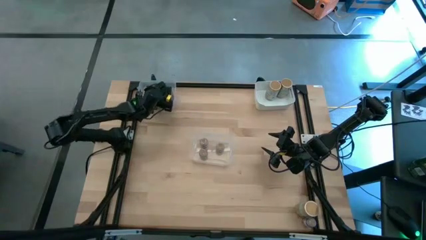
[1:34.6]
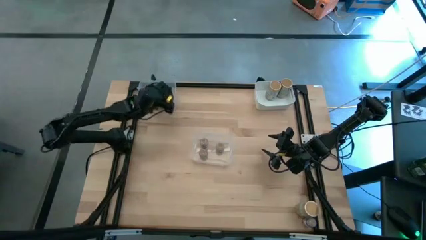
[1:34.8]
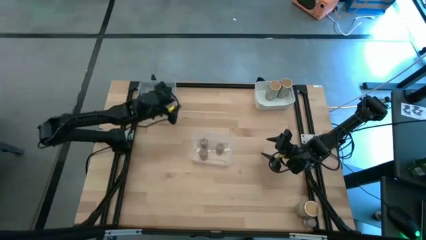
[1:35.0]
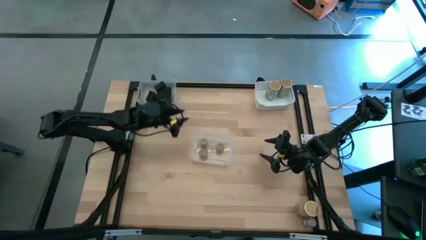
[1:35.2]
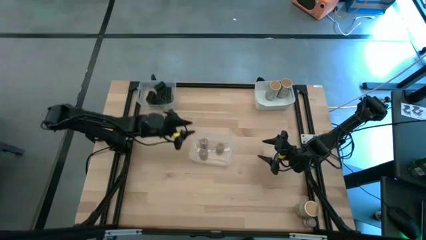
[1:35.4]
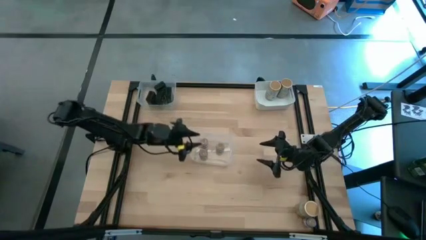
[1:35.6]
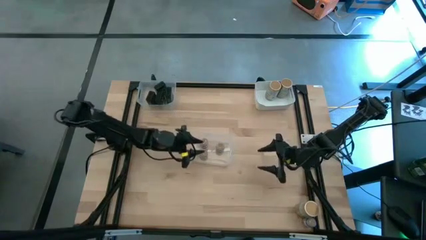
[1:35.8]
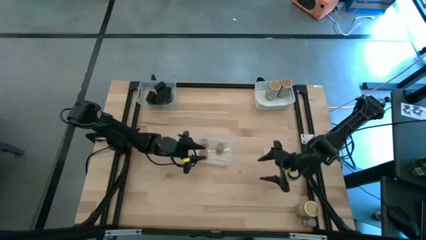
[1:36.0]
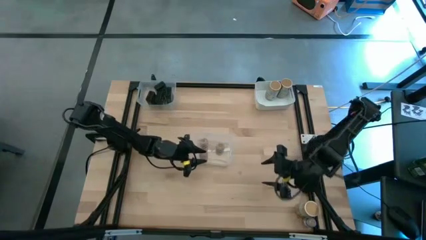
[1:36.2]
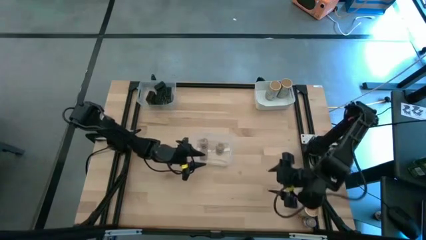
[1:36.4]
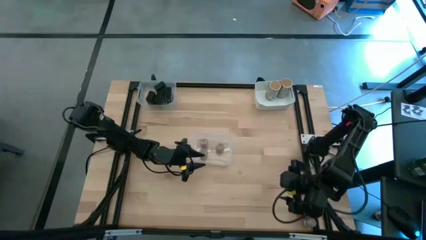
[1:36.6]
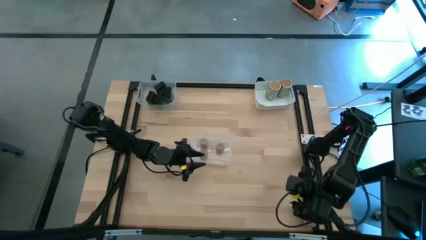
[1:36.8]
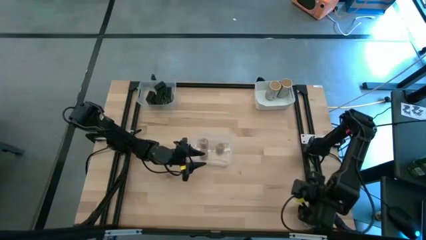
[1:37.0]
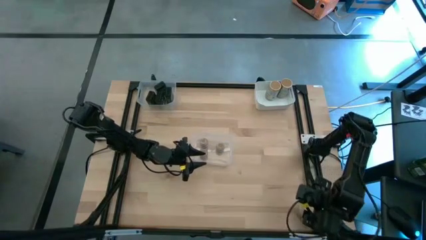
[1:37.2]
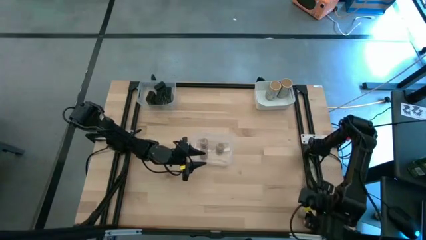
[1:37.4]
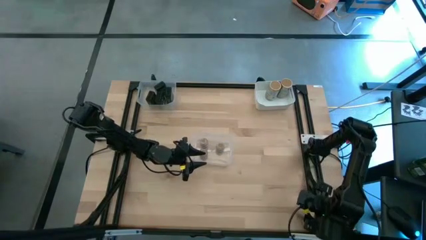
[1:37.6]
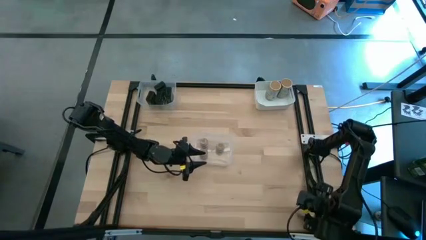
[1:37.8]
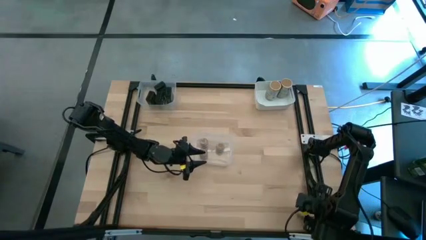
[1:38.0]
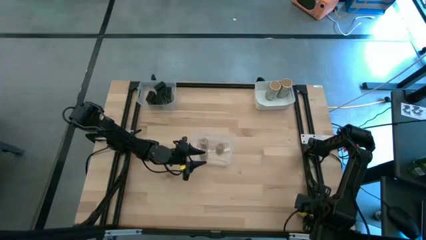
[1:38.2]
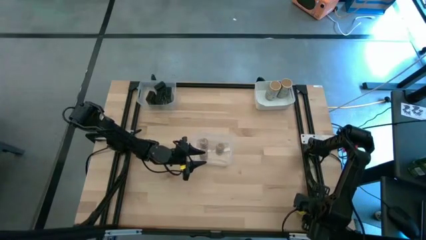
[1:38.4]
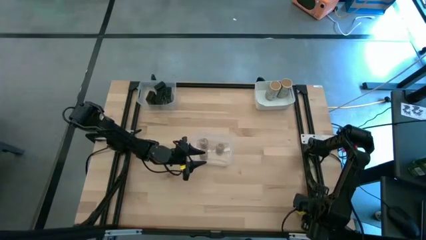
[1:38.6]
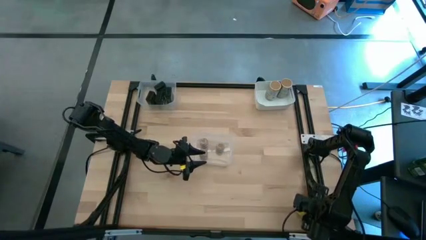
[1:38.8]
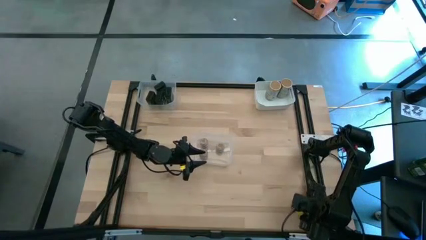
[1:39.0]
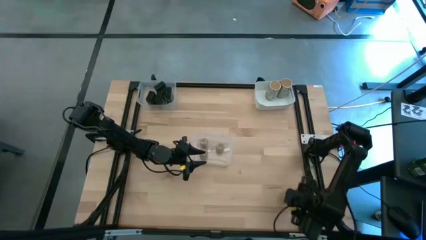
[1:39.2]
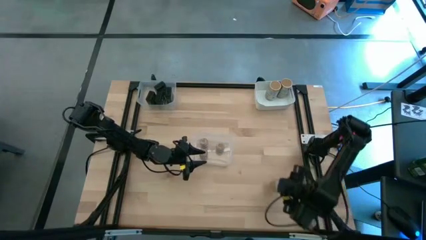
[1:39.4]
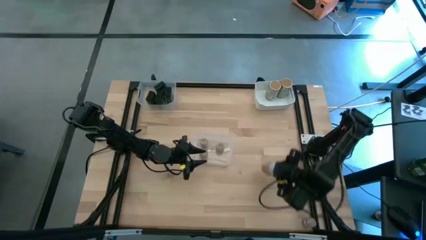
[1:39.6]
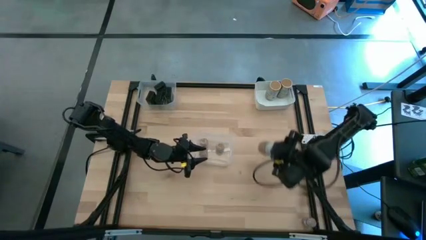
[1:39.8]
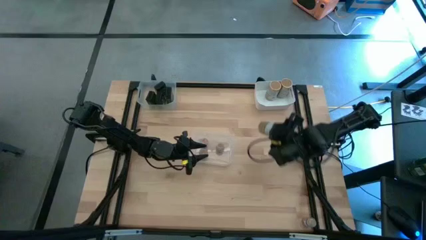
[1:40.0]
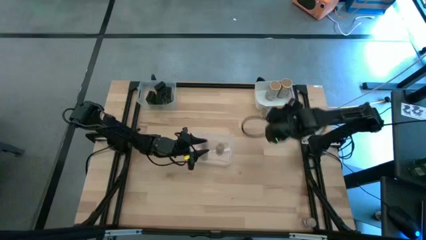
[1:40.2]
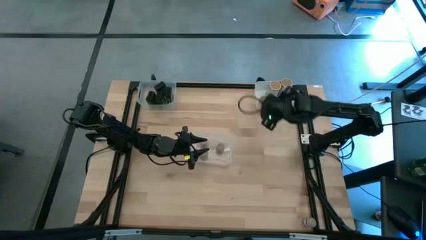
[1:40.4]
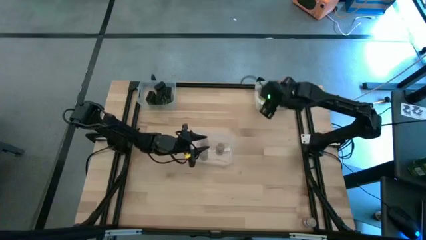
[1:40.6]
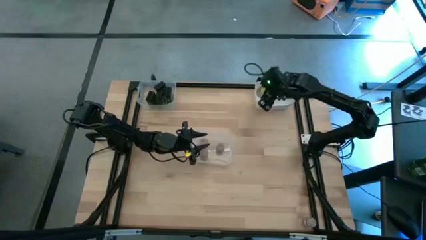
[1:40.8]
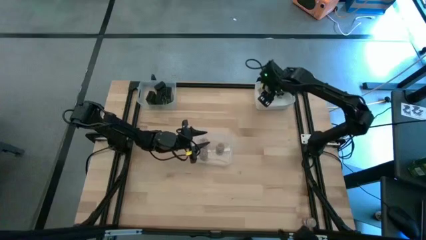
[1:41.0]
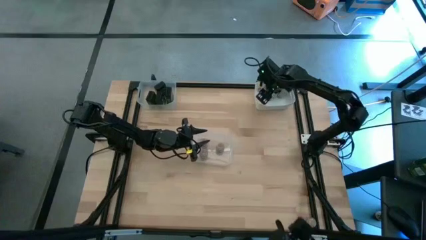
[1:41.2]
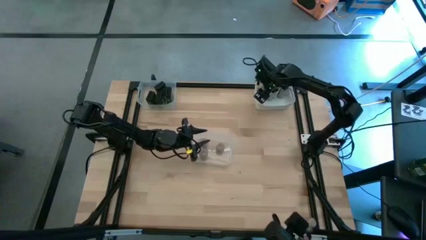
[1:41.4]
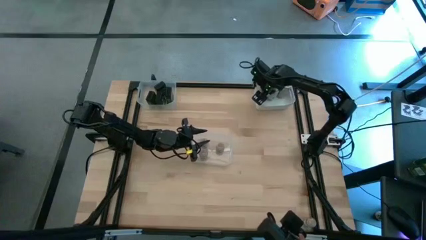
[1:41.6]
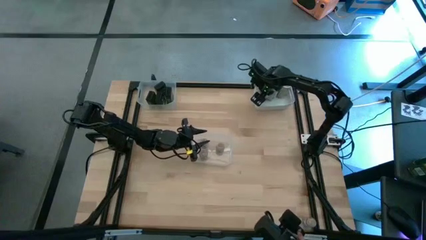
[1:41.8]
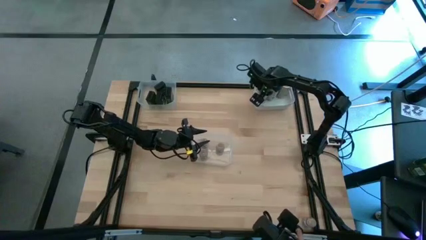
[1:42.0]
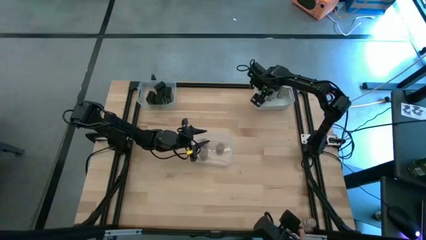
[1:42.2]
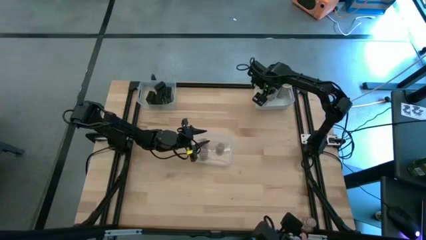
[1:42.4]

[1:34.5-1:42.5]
Task: Sort spices by type
Put the gold seasoning bottle into the white bin

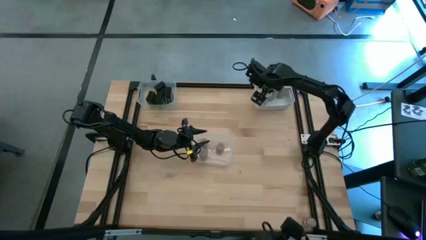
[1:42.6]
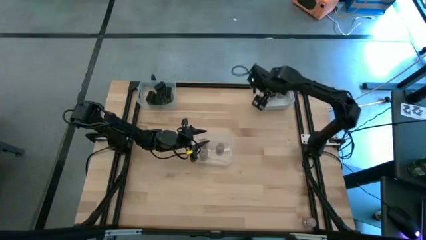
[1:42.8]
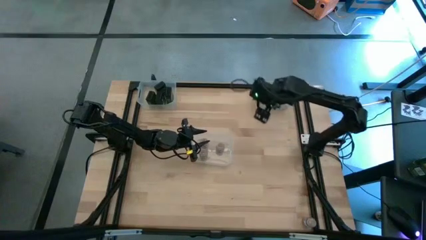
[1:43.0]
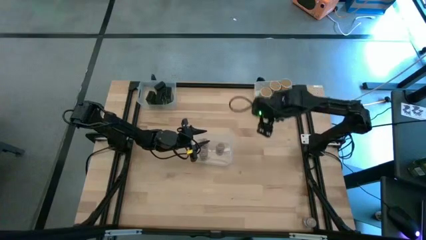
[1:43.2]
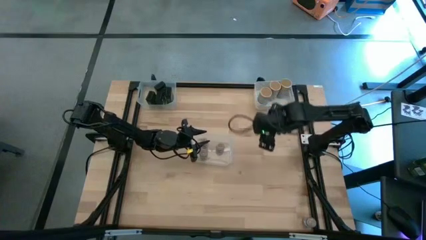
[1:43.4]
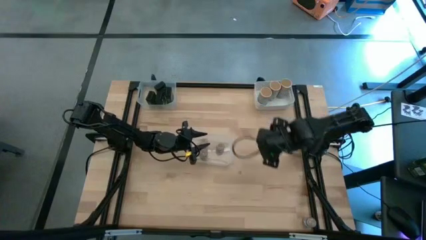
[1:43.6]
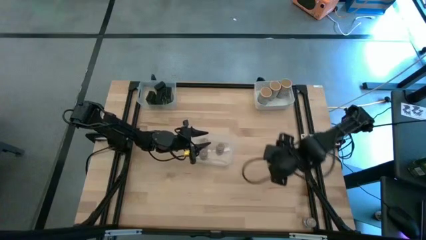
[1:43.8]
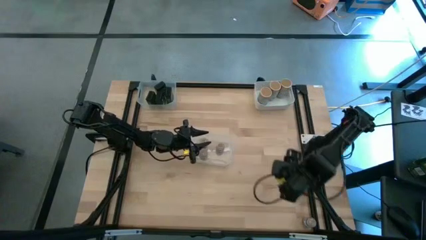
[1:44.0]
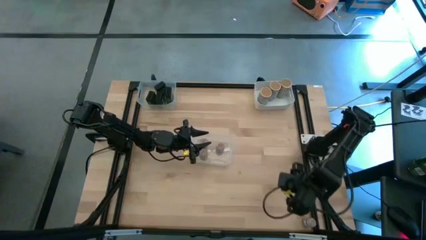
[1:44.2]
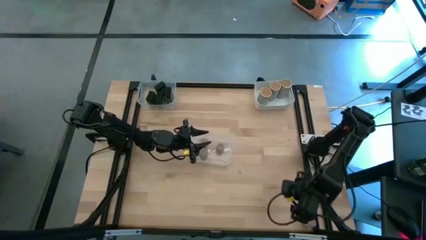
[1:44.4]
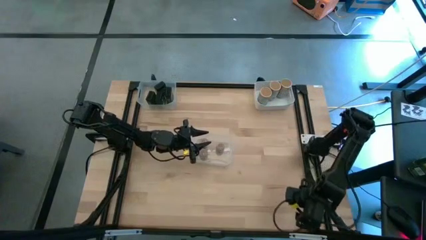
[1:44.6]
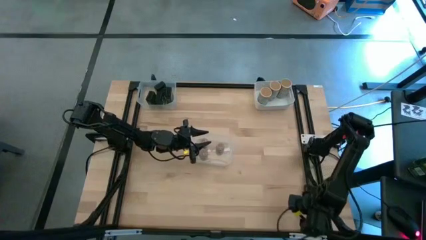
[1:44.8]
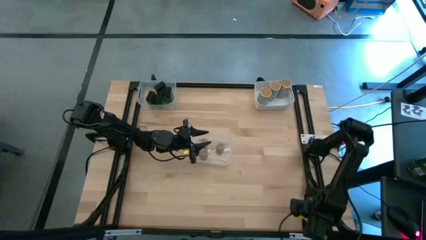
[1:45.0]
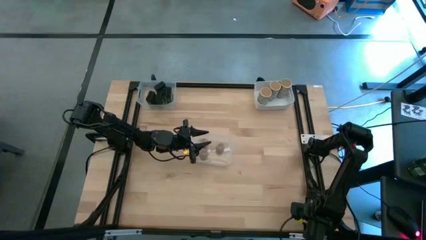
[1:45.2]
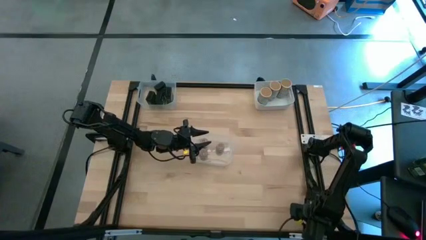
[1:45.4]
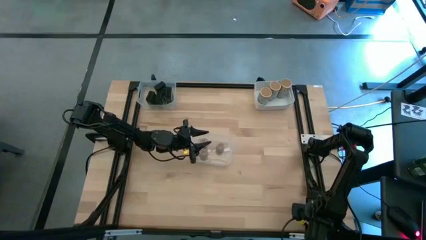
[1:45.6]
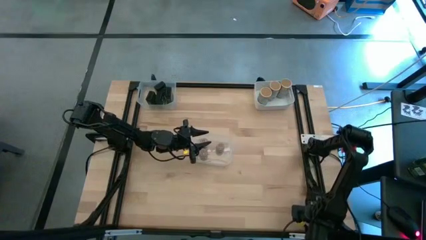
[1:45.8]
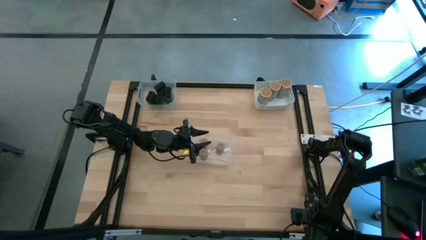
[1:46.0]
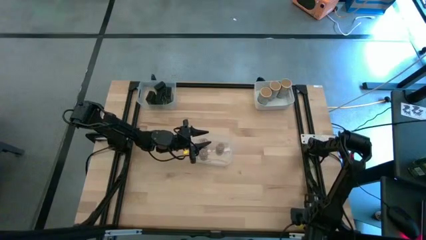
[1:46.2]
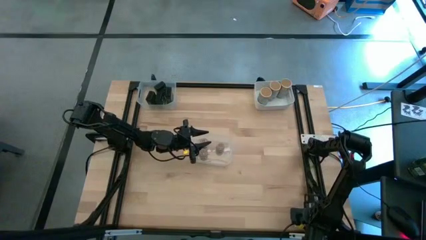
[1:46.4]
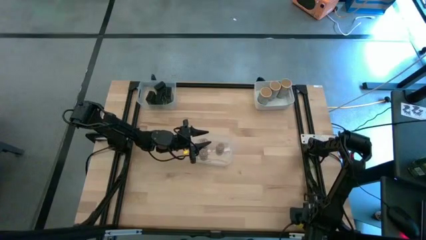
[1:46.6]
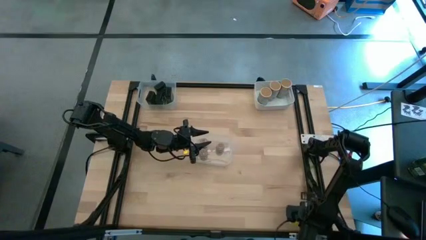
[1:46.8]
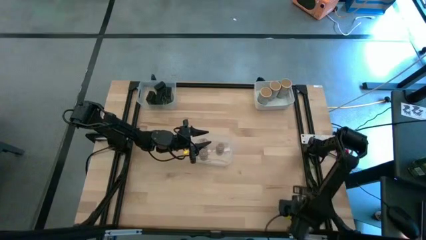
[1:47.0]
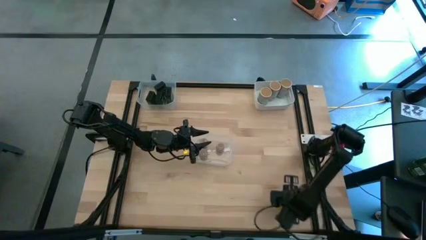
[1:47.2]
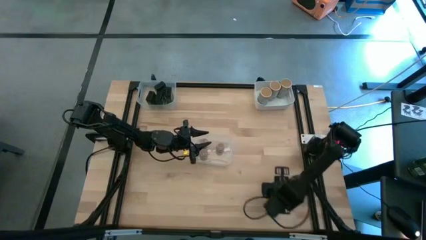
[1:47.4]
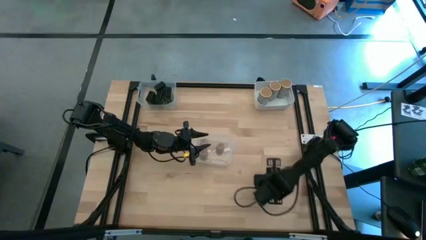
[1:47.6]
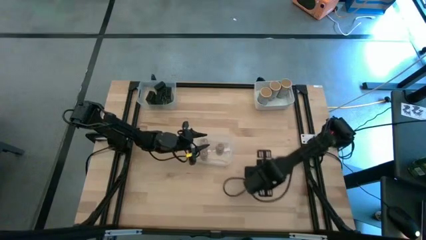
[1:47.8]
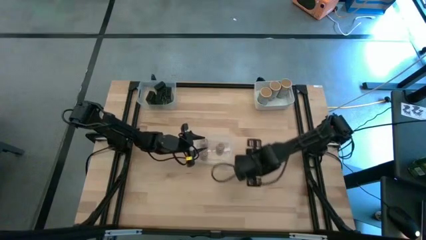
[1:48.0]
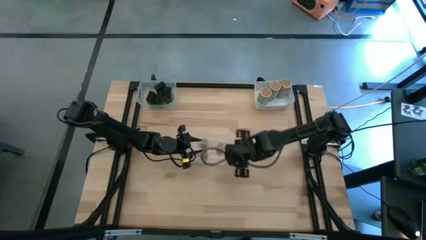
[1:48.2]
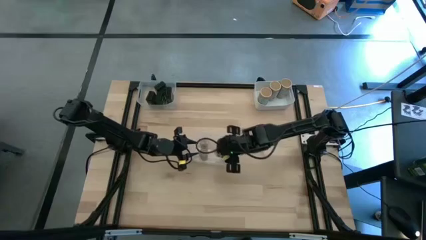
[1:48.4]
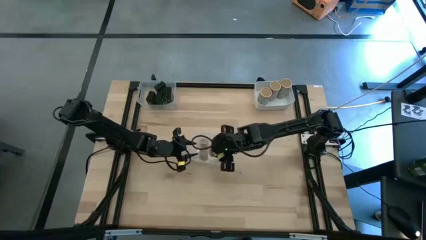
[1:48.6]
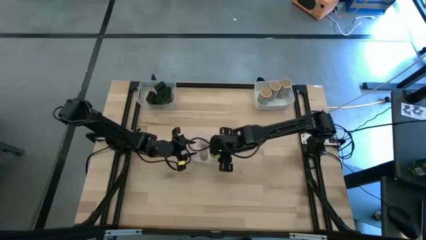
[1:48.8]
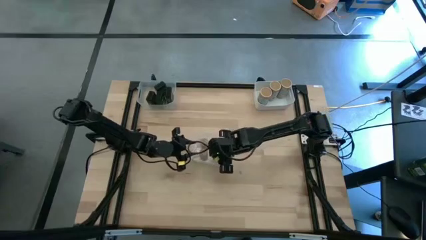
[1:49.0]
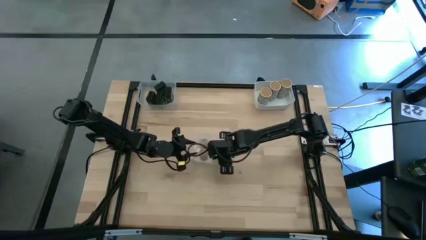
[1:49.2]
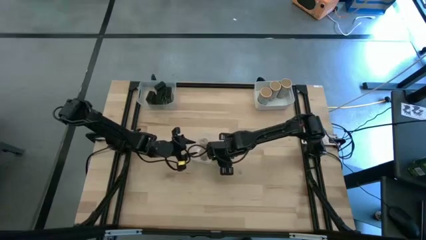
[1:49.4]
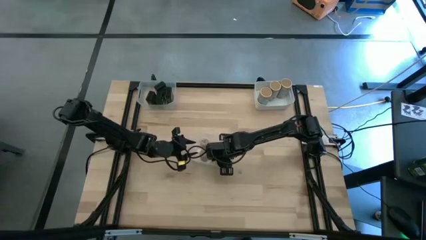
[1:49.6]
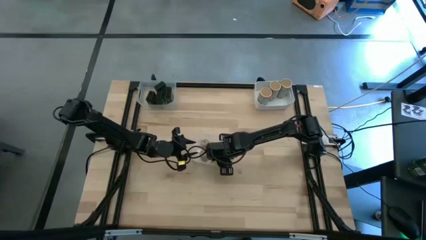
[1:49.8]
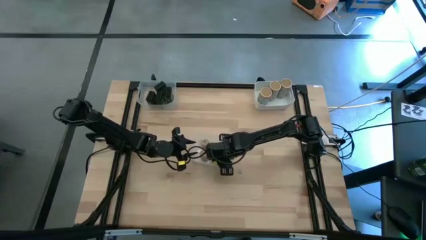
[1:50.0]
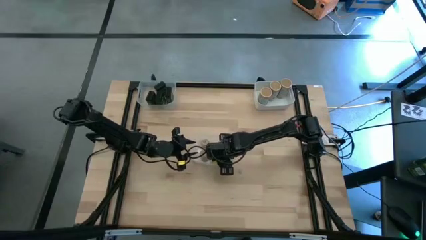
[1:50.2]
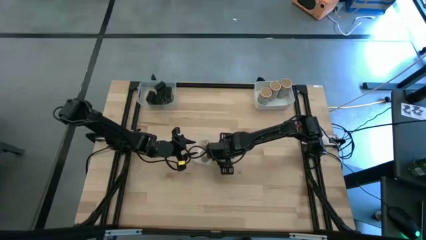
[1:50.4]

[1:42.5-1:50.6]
Put the brown seasoning bottle into the bottom transparent bin
